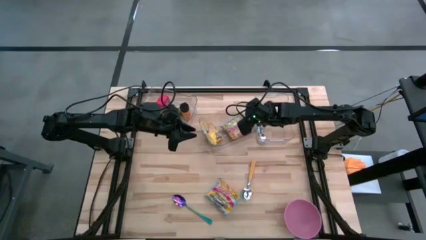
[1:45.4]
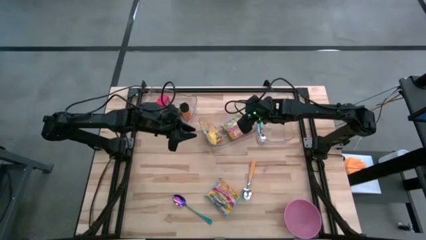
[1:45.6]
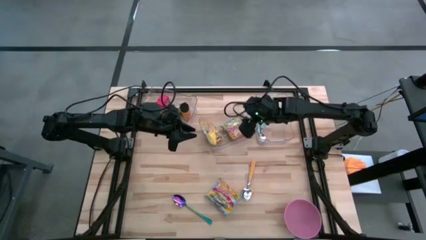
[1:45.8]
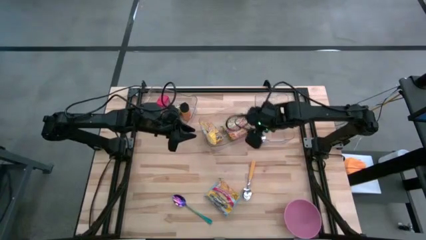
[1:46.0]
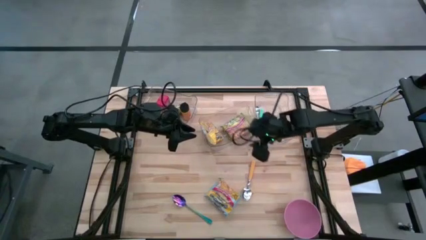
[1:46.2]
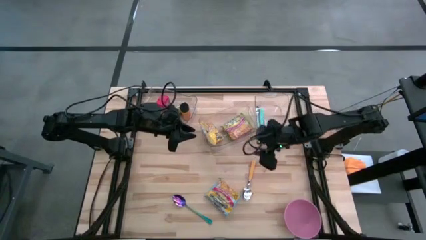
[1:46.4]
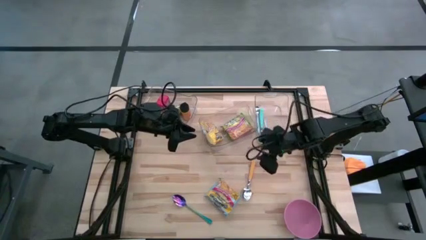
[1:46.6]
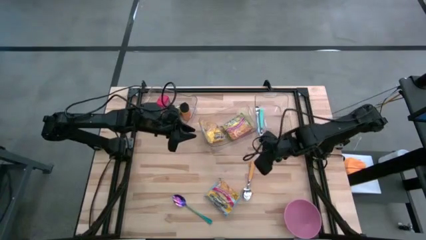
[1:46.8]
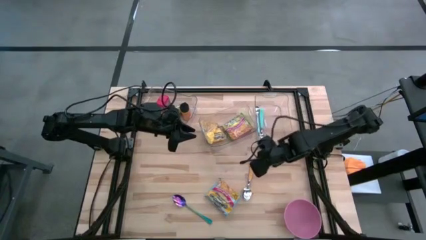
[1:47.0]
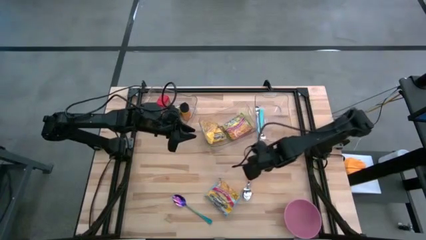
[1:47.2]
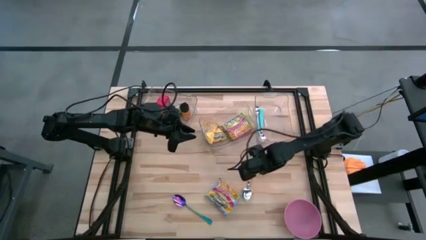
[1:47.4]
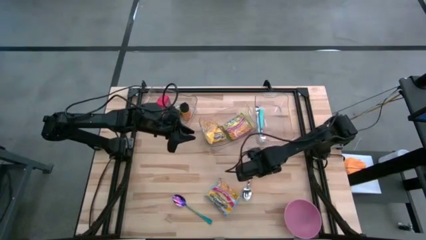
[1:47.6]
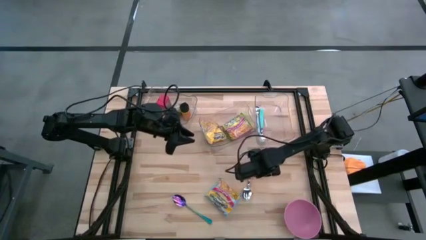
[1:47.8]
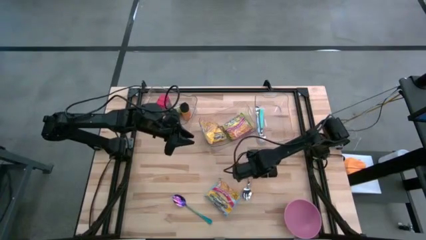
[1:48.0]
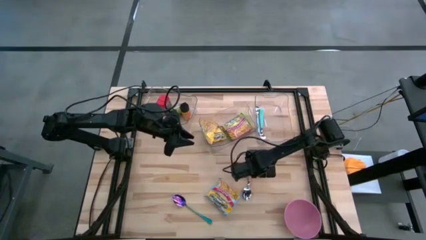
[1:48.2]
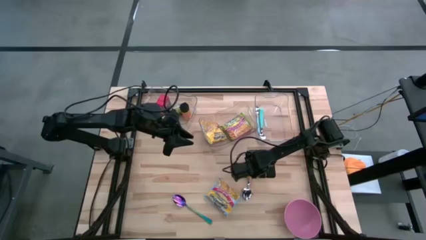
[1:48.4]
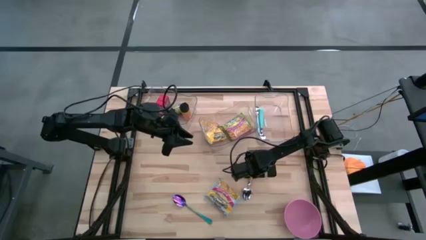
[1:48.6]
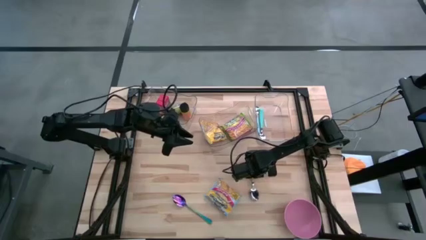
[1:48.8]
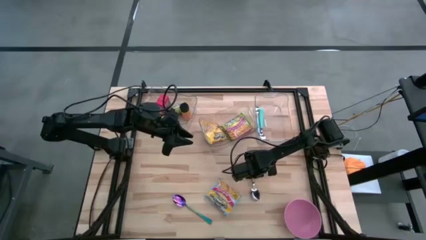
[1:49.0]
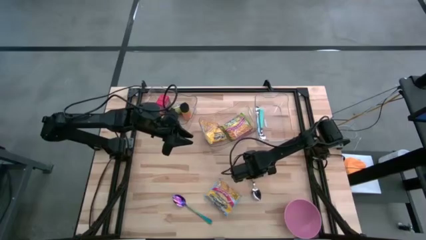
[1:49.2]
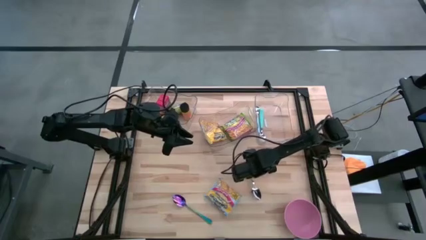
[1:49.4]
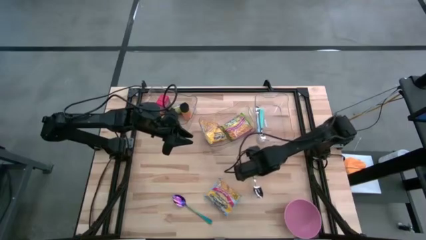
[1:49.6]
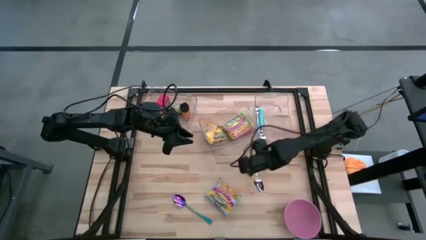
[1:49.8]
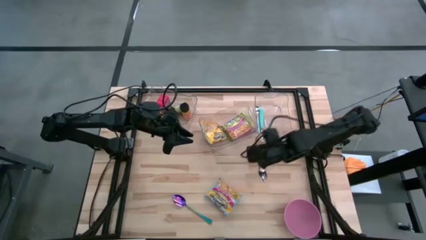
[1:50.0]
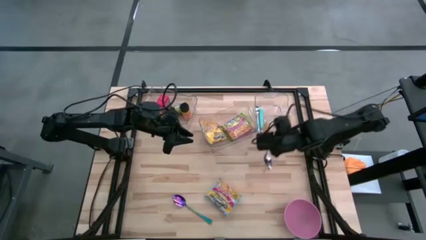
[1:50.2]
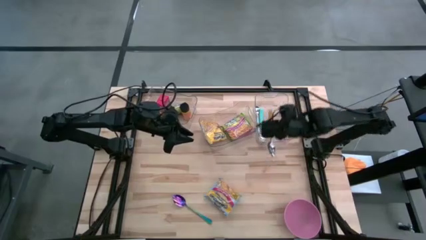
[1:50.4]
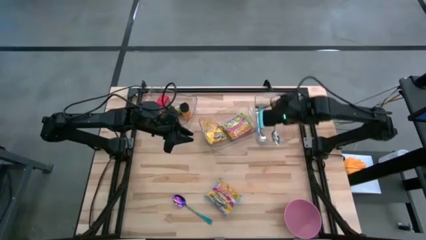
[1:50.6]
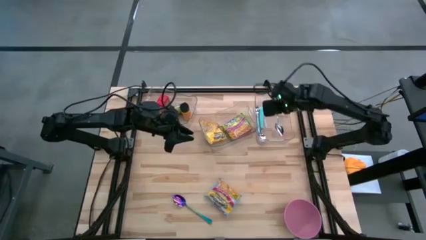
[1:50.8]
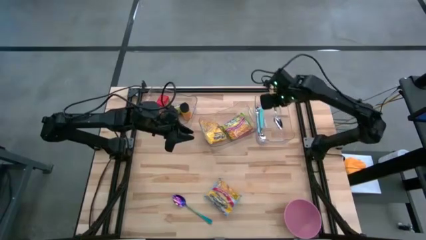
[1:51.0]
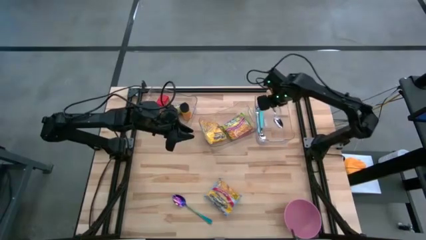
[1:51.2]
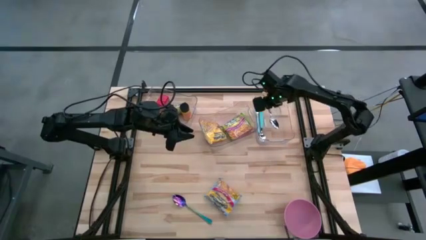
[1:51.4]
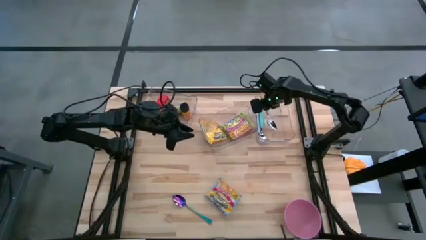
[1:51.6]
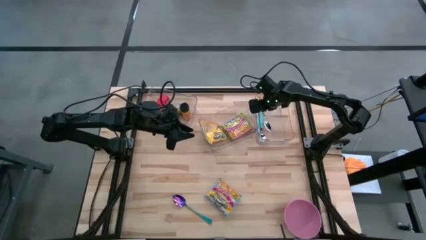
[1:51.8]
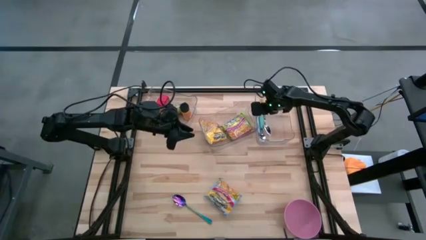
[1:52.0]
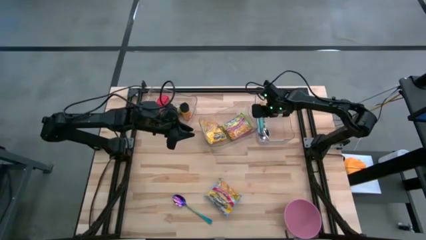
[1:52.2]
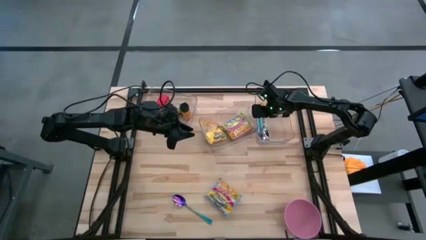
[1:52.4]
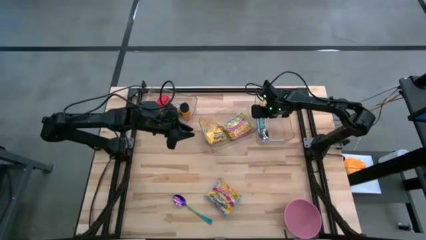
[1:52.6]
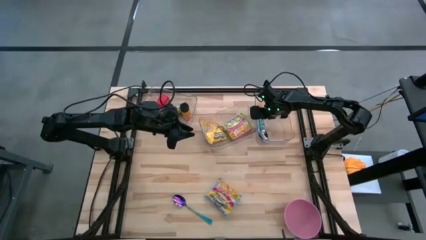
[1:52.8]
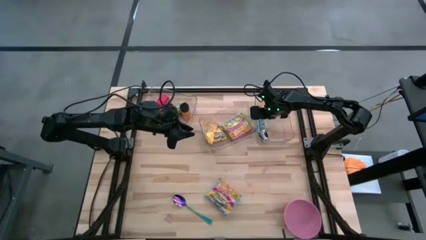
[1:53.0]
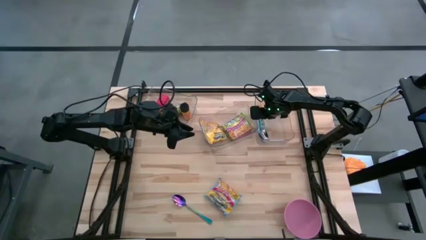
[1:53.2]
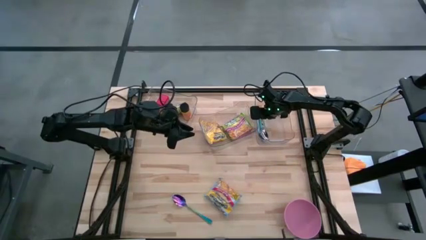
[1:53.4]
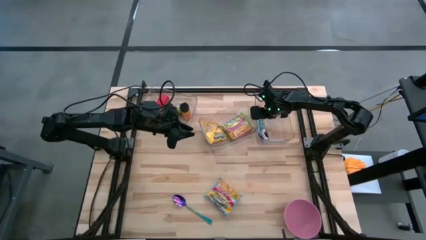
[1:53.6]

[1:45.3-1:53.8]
Task: Pick & Place Food Item
Put the yellow spoon into the right transparent bin

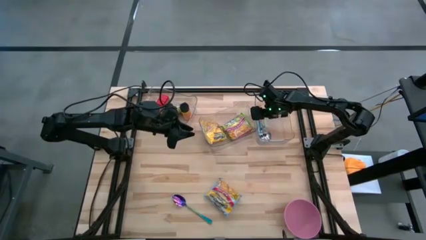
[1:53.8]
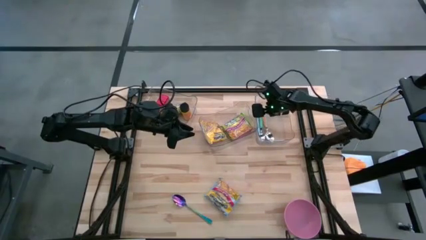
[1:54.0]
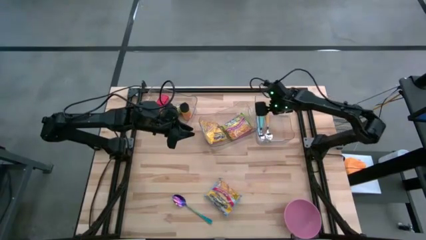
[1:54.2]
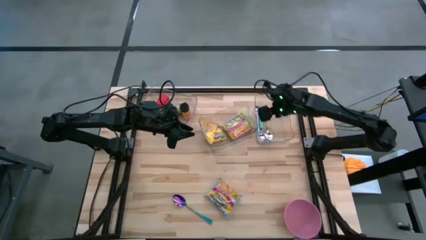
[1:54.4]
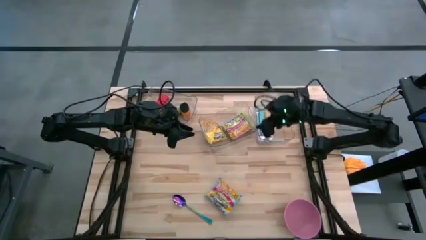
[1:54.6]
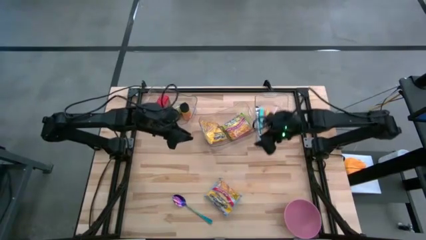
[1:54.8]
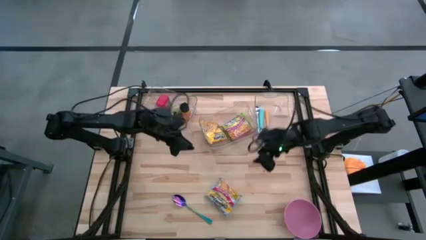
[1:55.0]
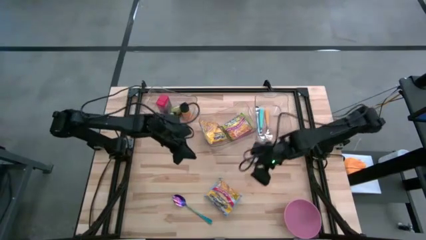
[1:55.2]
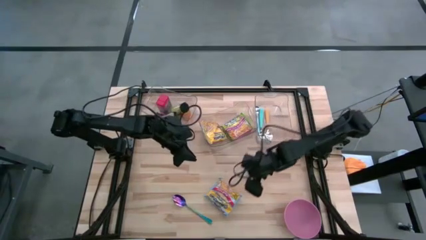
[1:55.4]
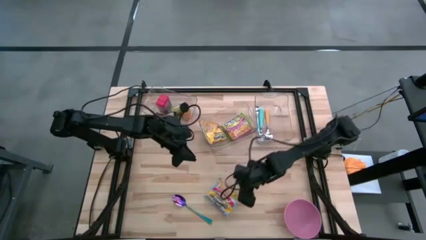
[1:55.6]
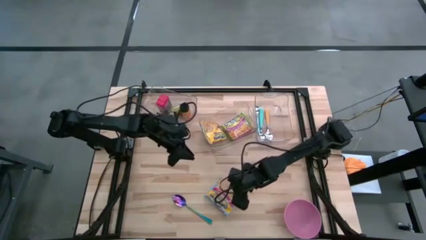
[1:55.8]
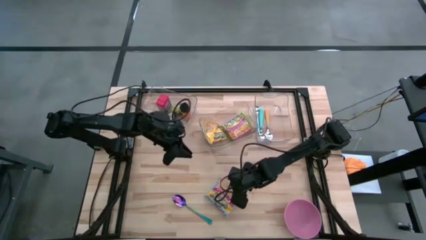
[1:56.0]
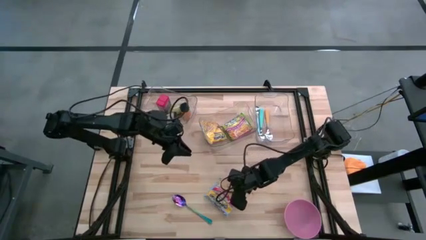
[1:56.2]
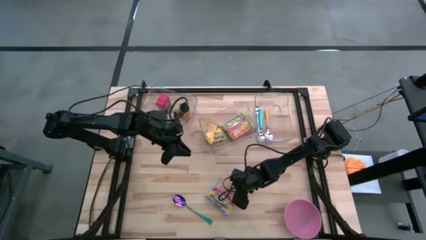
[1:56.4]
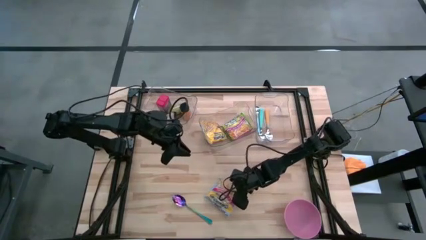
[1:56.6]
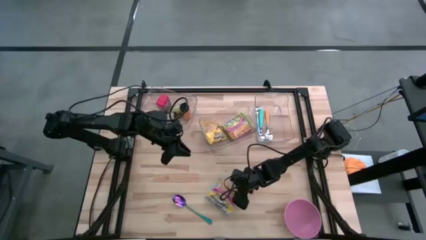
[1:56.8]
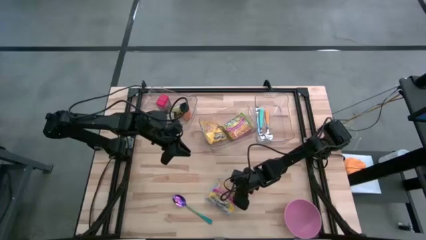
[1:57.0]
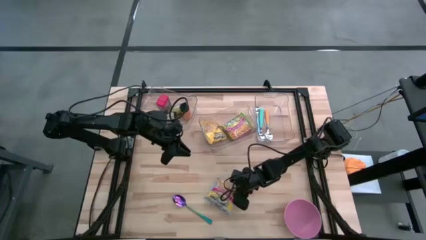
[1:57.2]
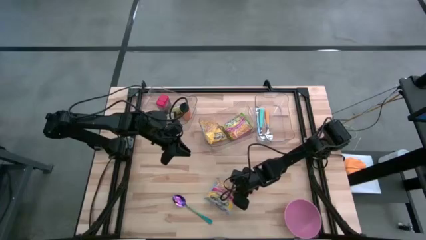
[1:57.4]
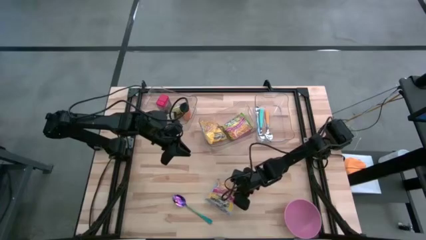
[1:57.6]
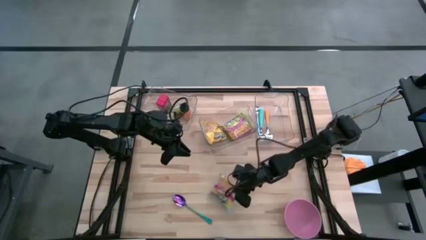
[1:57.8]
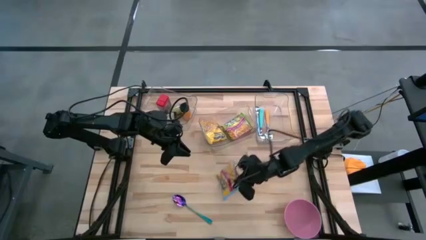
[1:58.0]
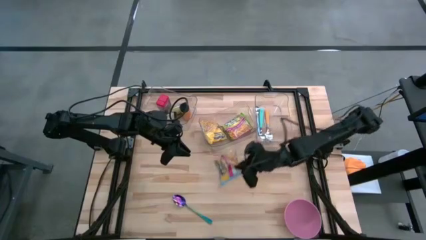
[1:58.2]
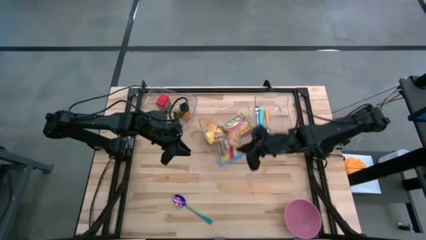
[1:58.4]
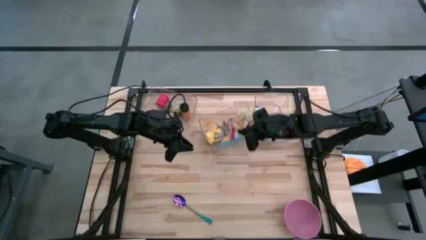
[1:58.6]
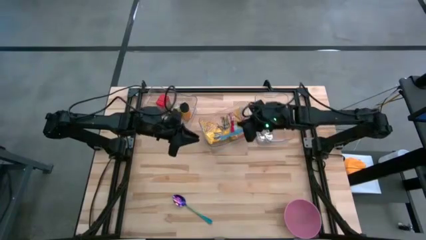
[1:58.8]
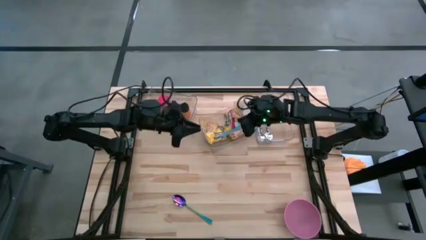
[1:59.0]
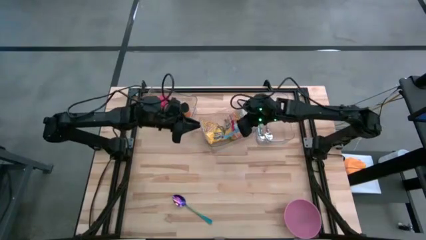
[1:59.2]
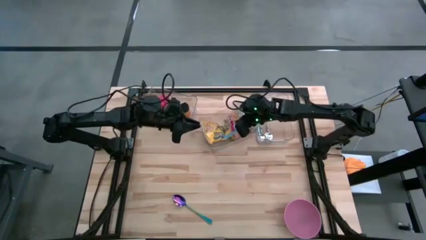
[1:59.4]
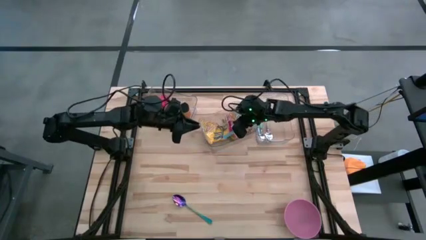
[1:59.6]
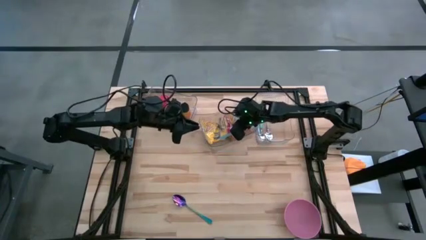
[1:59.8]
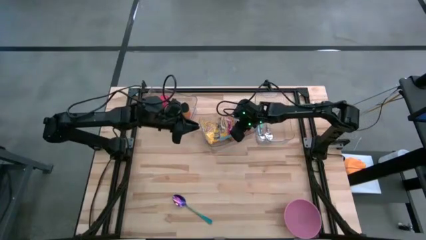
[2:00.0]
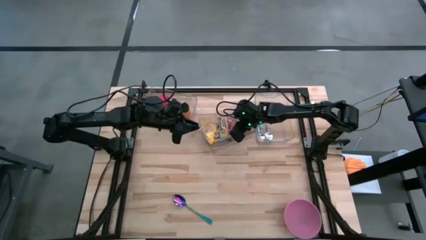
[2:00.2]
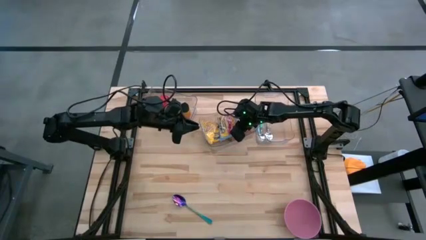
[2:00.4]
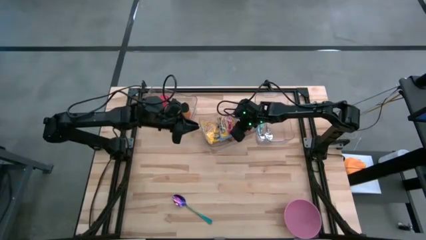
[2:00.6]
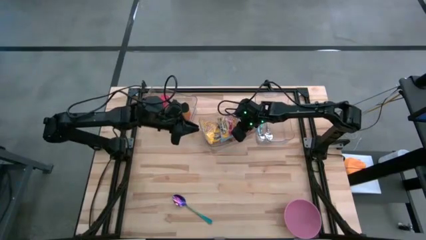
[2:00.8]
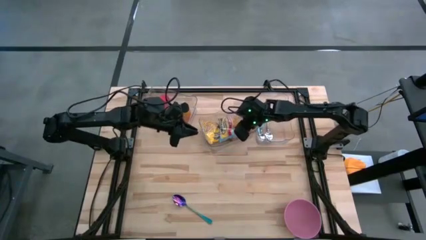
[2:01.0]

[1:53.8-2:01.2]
Put the blue noodle pack into the middle transparent bin
